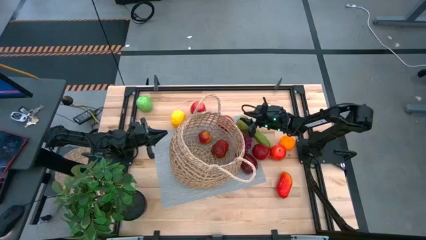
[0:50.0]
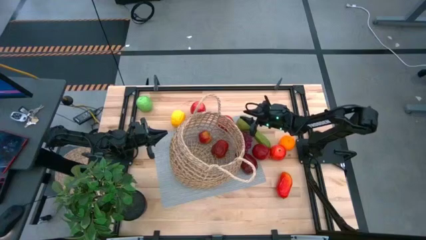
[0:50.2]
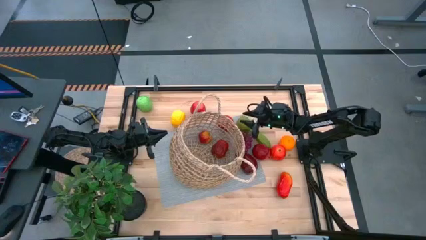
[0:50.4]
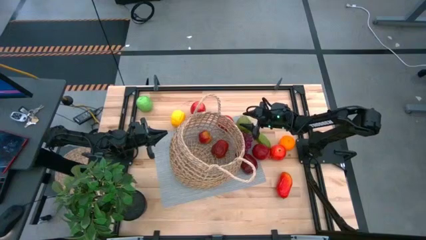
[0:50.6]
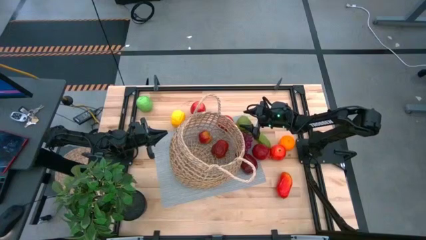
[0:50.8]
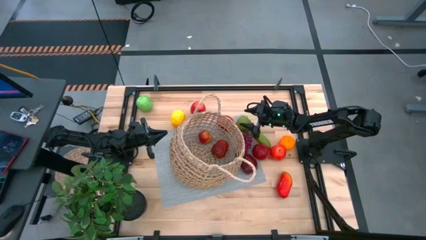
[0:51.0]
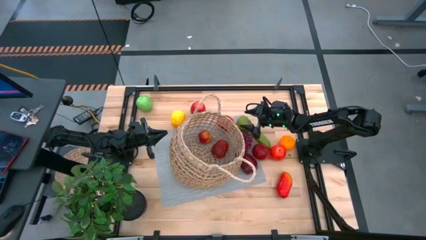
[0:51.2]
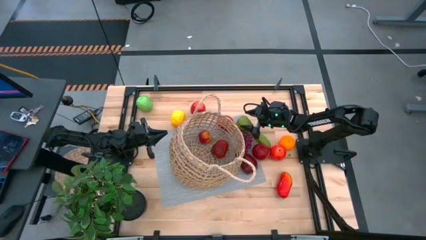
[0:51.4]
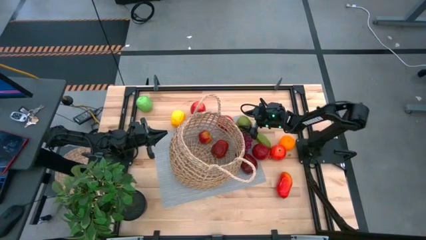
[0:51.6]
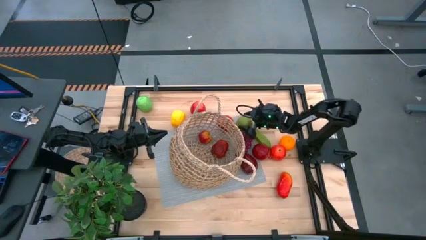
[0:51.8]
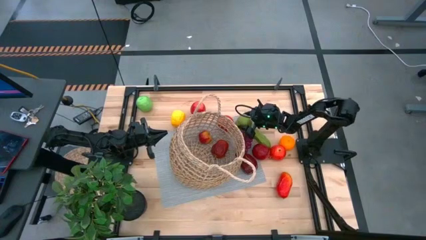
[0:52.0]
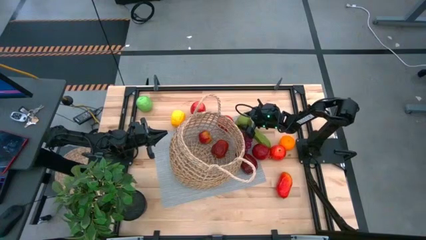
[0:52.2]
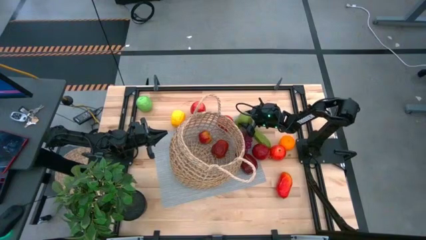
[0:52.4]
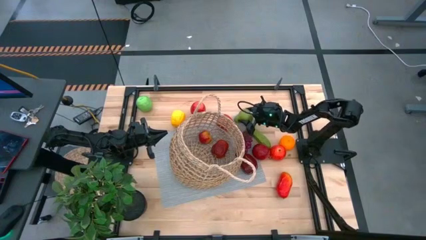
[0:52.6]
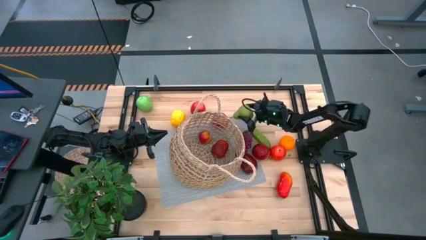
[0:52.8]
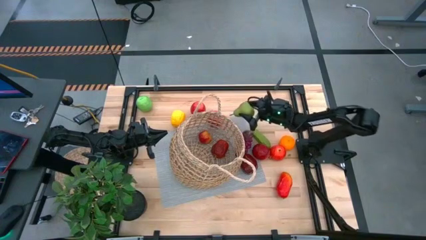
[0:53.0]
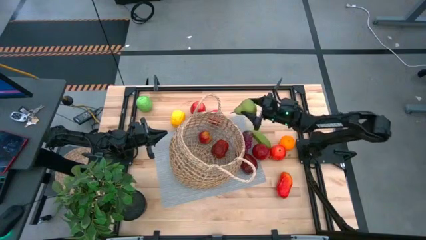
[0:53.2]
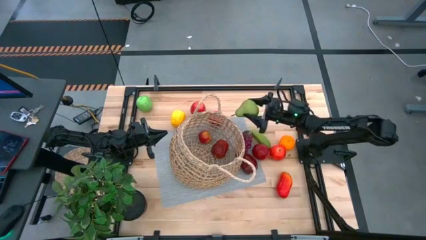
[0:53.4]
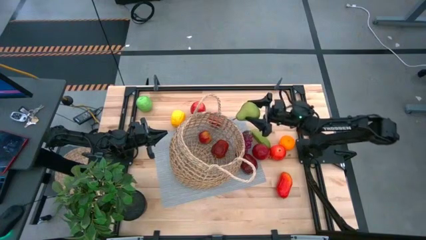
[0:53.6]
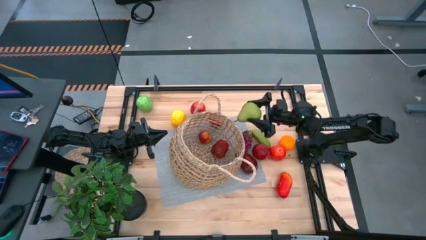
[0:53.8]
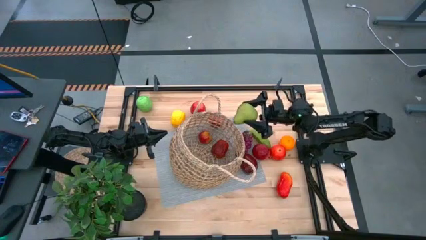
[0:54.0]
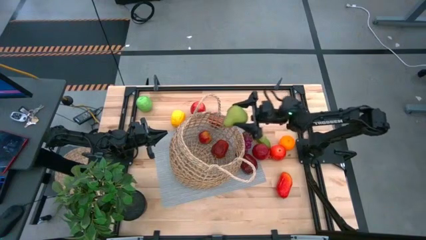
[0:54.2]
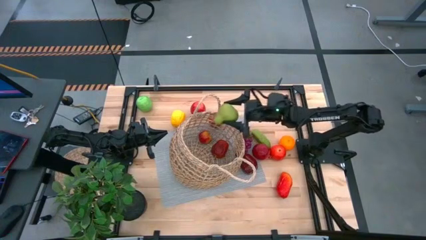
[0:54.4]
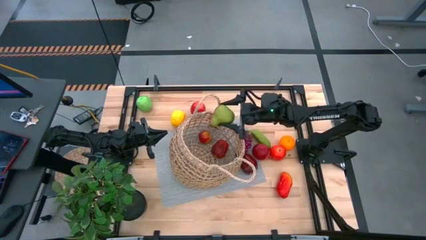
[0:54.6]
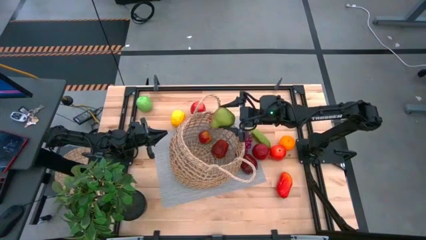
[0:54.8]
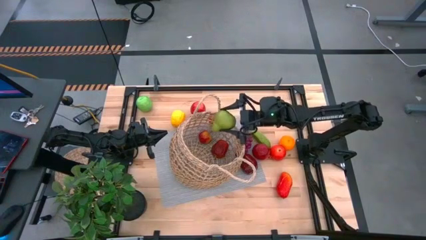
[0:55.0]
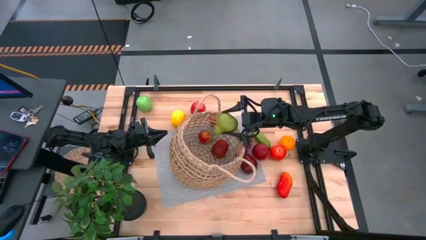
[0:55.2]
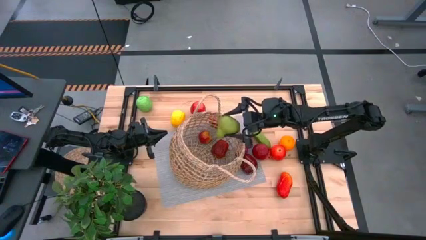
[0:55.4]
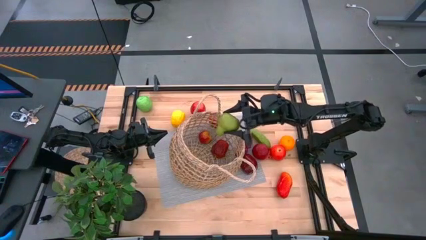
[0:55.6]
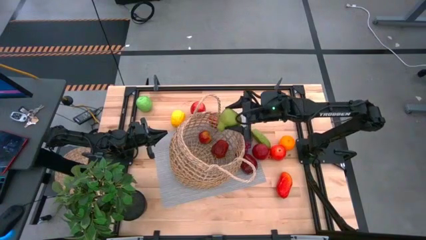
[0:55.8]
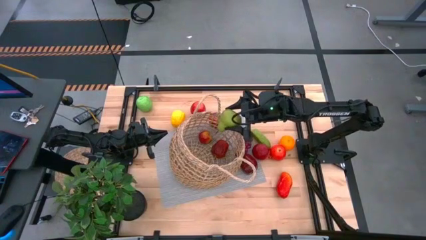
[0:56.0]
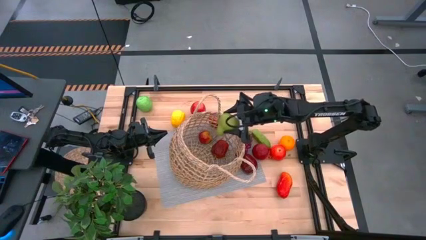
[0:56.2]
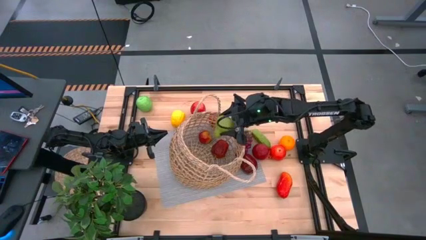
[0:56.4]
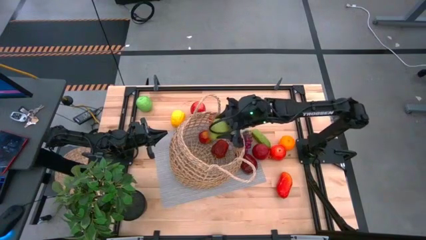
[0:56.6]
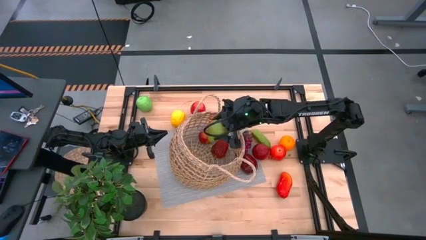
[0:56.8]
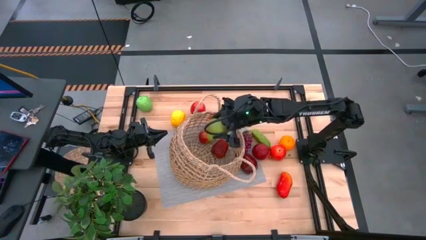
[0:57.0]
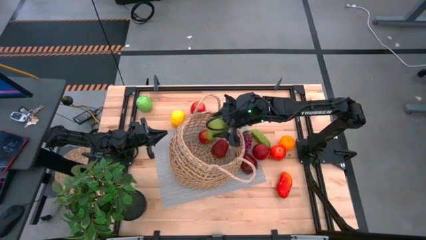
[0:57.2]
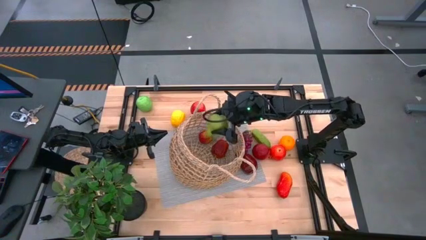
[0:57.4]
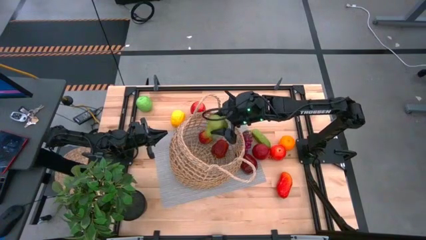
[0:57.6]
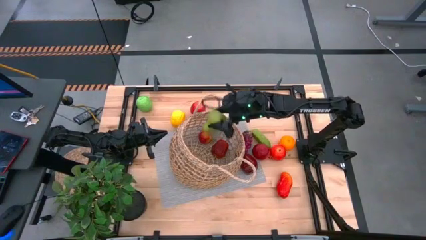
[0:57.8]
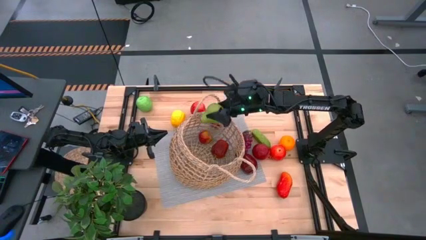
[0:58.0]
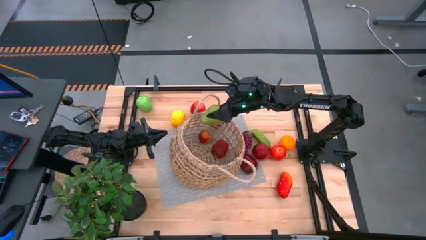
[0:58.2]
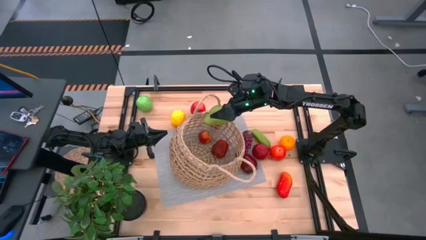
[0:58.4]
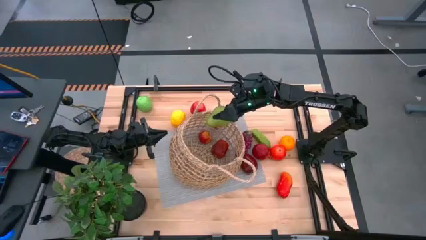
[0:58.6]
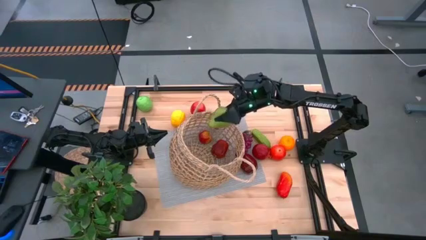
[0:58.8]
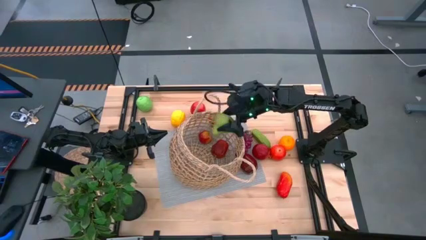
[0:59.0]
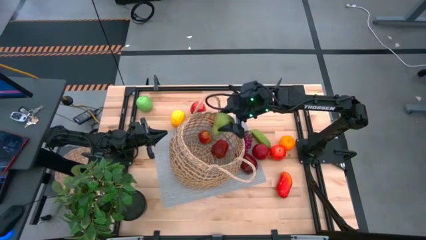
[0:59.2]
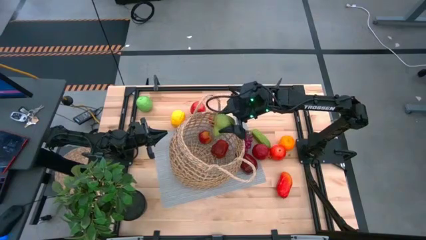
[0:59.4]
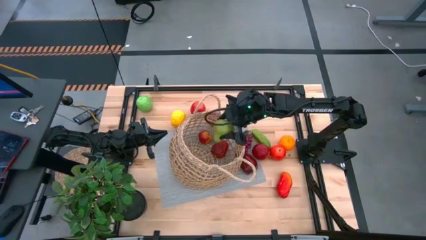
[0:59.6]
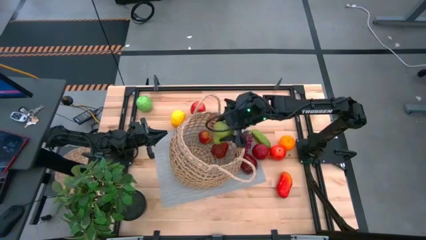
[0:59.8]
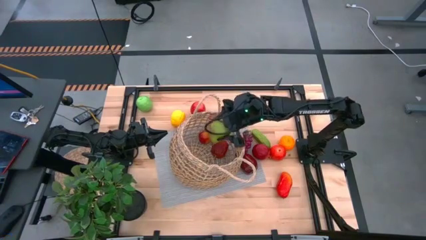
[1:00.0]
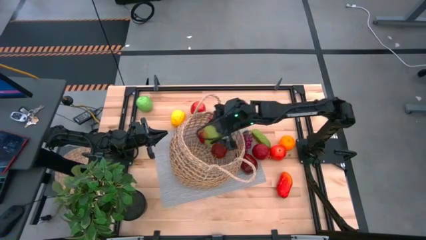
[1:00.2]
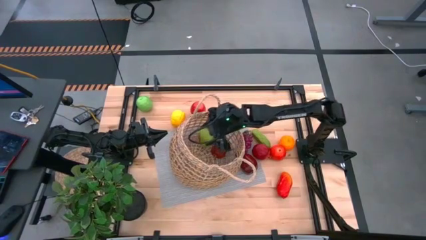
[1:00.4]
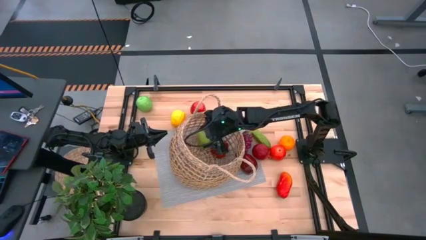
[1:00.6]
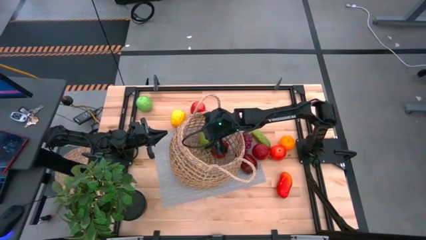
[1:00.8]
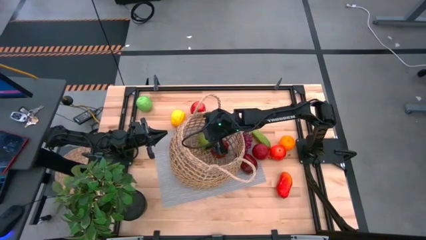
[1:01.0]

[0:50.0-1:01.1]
Task: Build produce basket
Put the pear into the basket

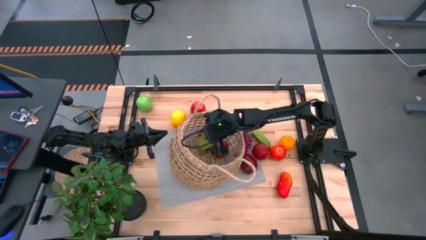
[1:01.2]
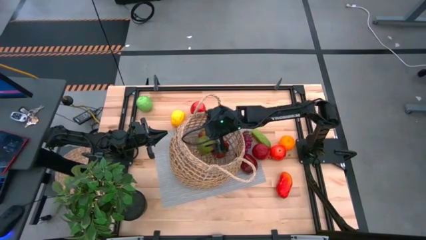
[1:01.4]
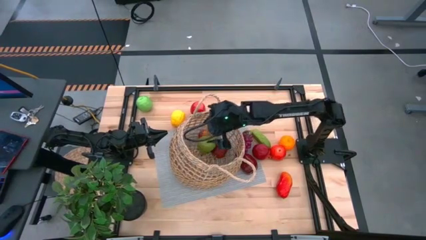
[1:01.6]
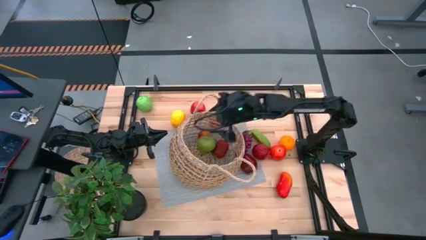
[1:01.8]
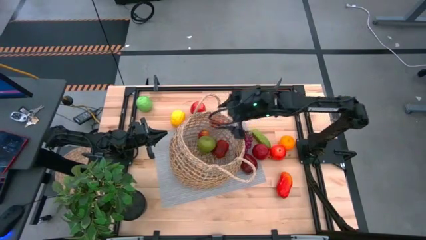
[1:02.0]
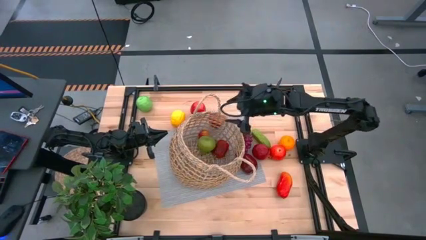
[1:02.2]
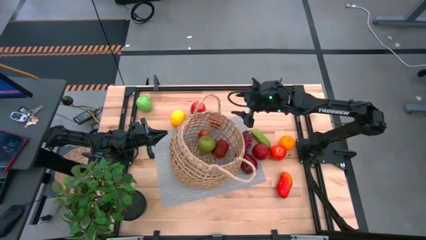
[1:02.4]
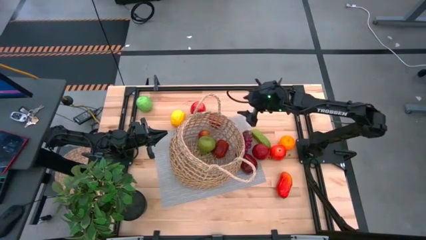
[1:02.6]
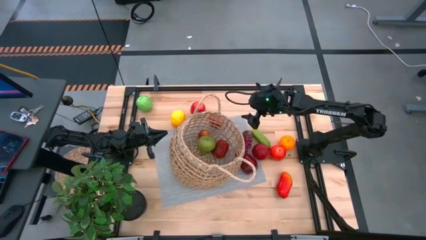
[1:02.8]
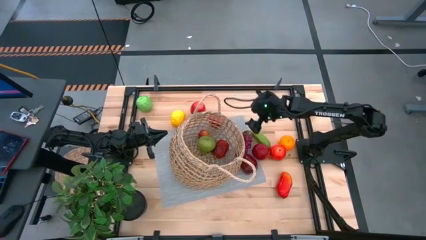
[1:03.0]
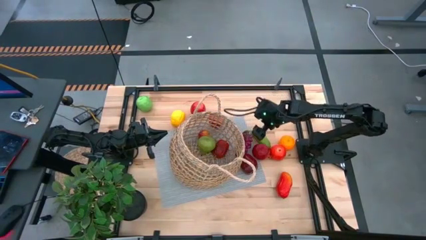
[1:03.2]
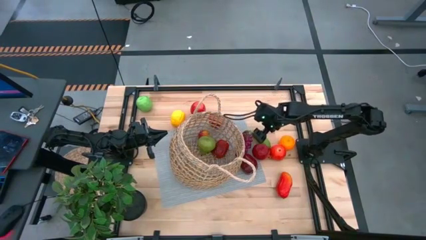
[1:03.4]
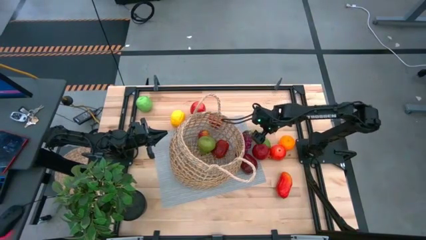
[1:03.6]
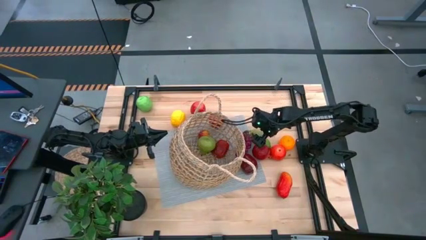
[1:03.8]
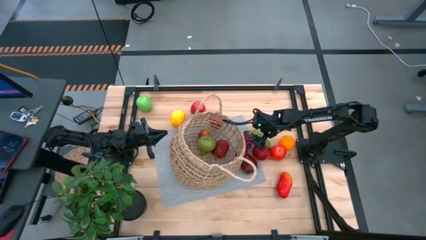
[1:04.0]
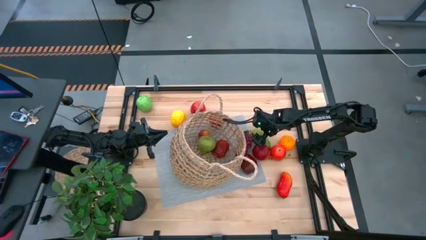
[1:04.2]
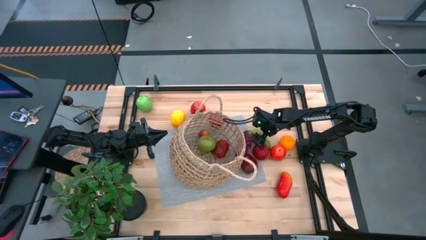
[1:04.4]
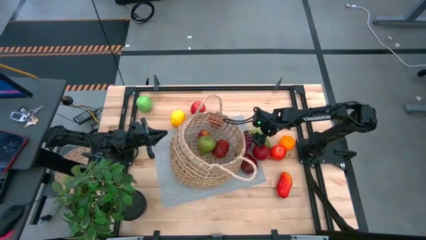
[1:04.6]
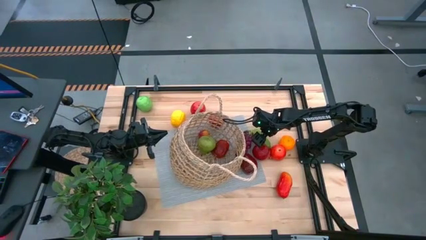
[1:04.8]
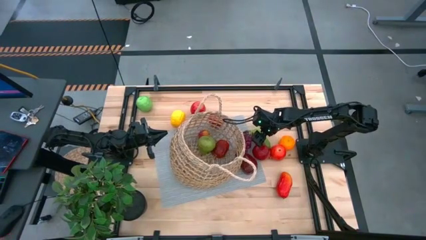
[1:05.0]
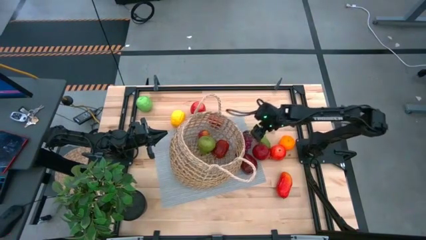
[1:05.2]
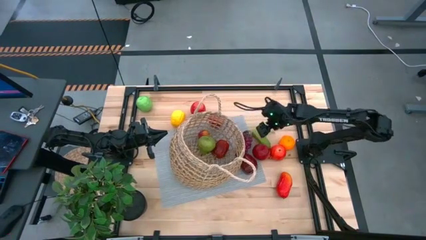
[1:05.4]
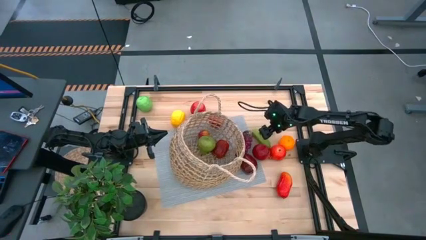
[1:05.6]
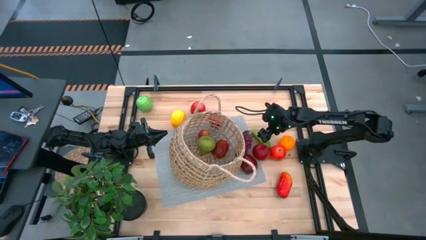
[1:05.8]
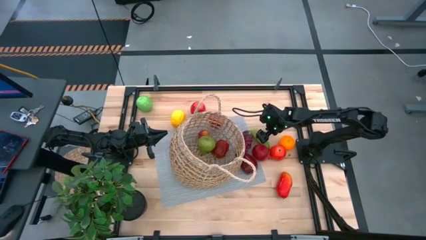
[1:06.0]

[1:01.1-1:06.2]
Put the cucumber into the basket

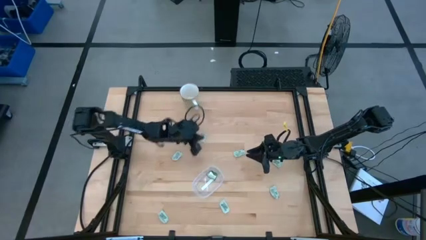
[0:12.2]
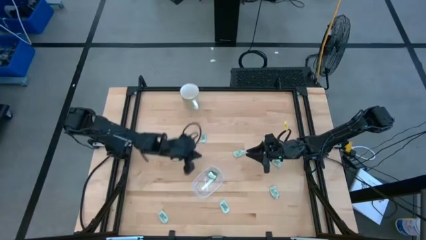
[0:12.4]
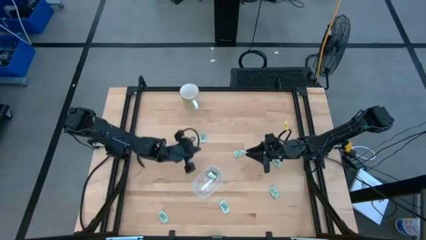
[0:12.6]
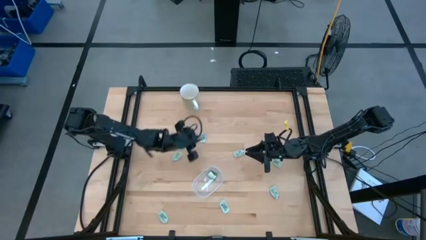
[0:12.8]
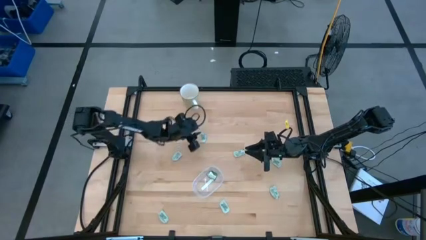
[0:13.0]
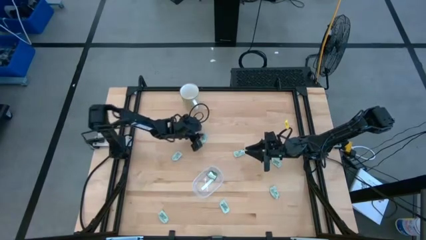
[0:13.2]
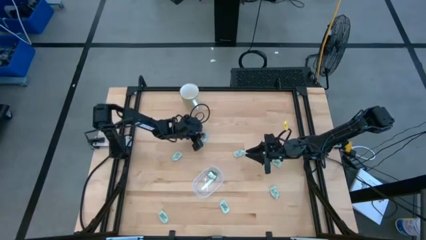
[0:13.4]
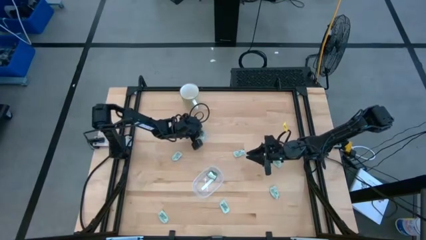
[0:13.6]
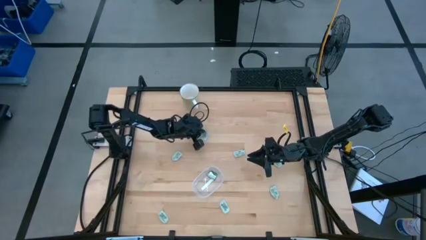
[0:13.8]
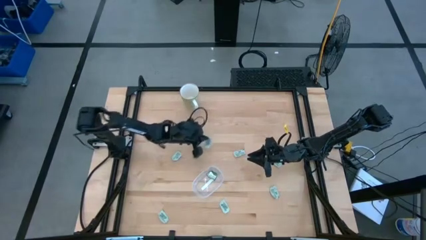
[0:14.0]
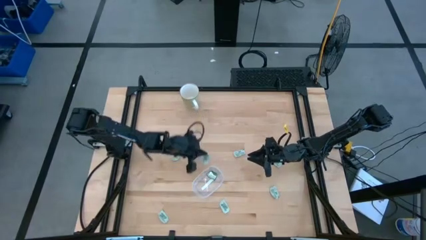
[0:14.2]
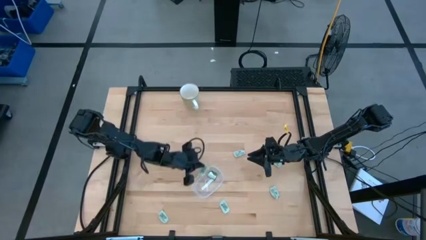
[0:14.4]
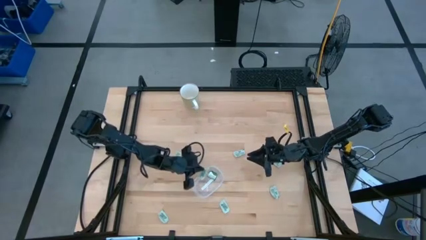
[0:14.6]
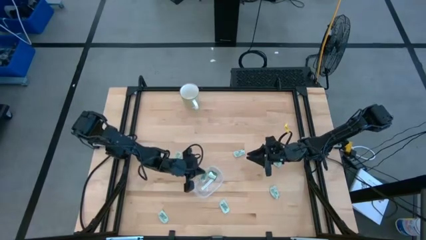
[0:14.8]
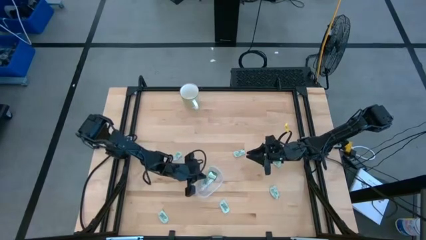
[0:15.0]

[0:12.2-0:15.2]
Task: Pick and place Stevia / Truvia into bins
Put the light green stevia packet into the transparent bin
